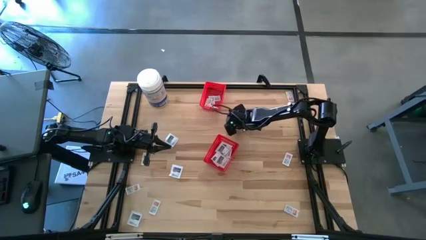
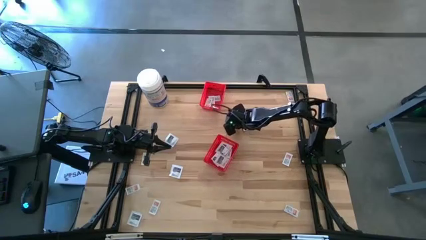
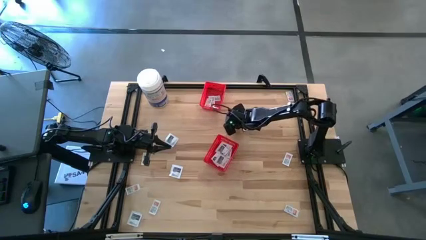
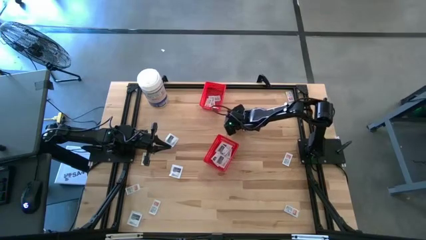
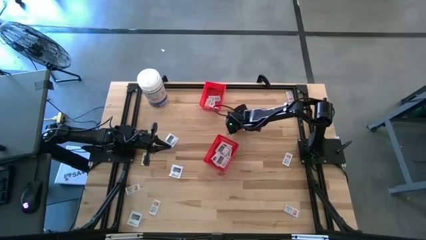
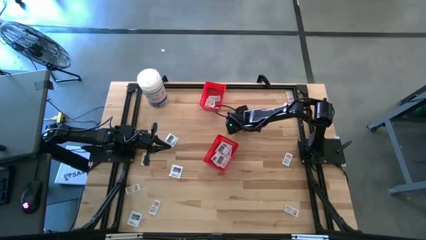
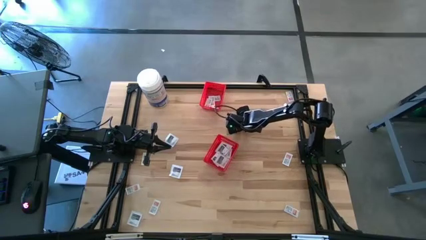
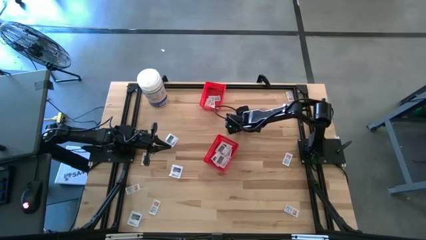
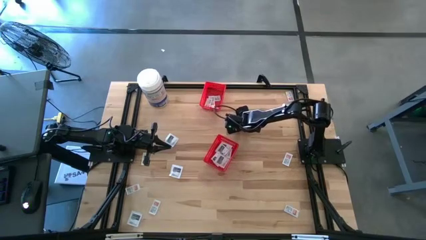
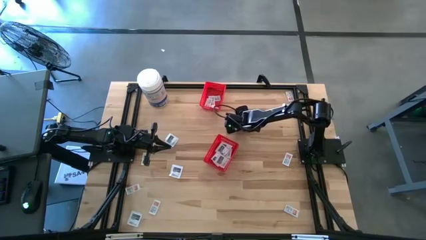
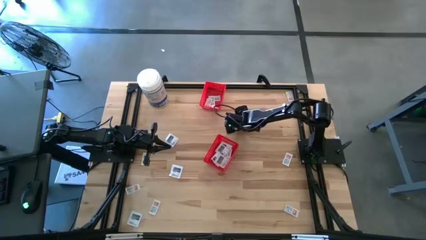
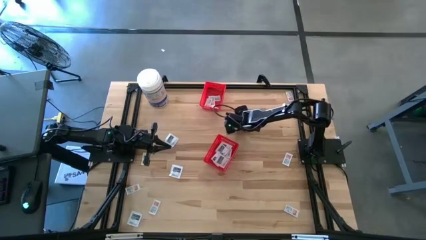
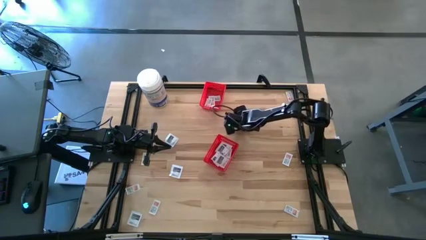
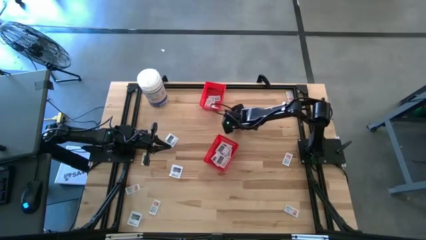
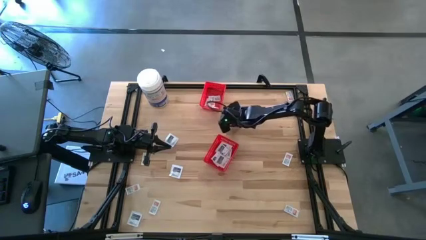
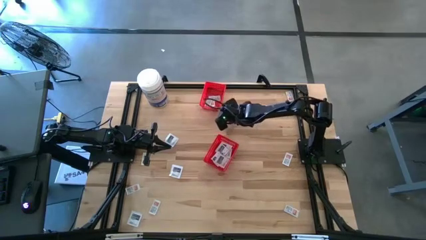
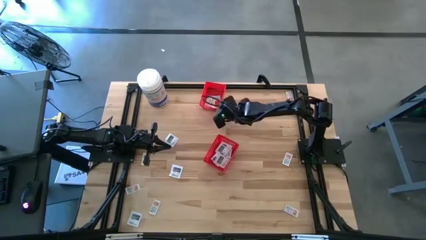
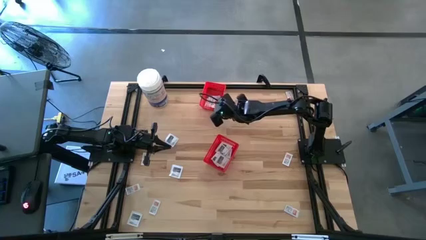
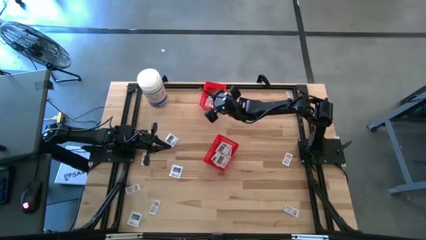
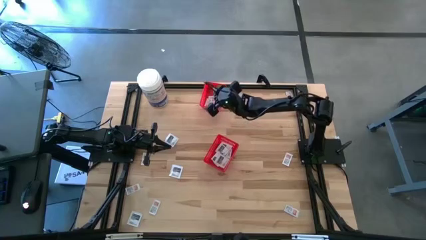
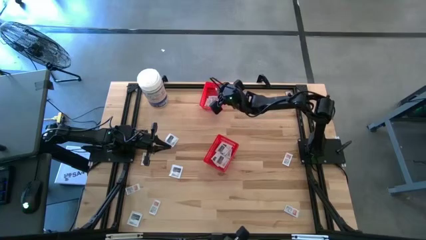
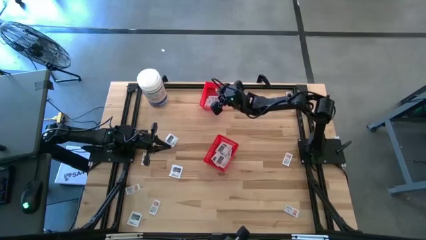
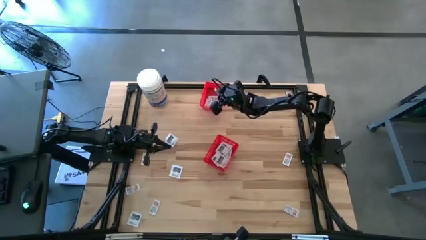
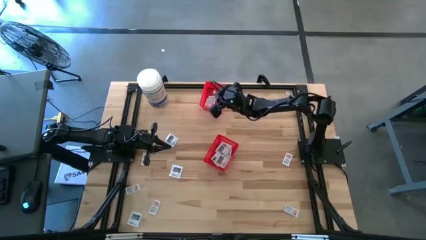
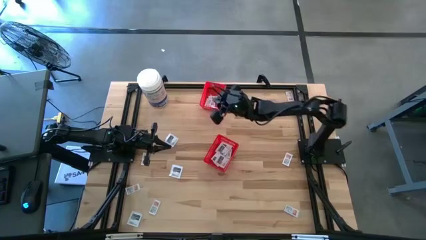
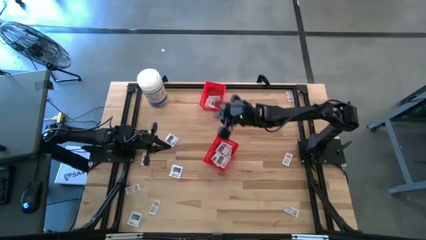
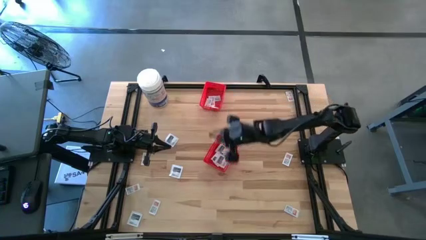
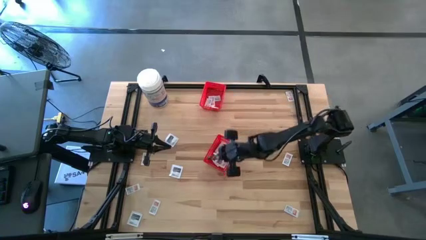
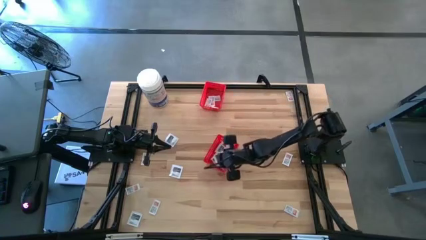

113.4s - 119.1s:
Task: Pick & Place First Aid Supplies
Put the white towelette pack into the bottom red bin

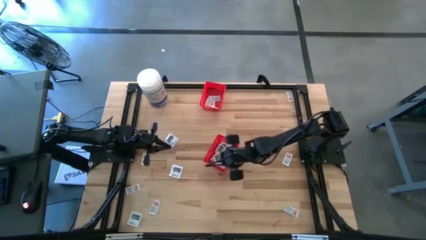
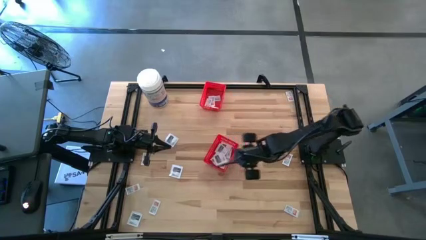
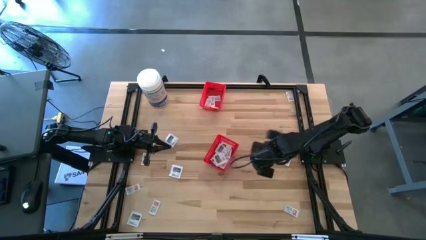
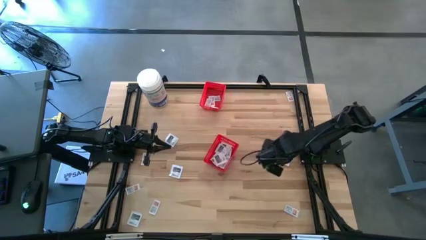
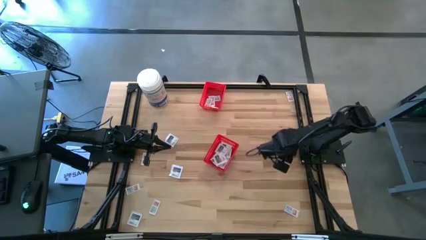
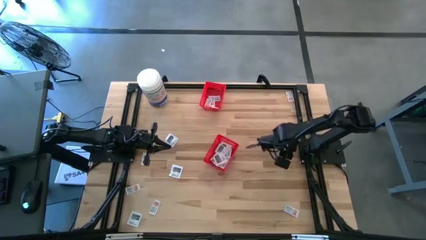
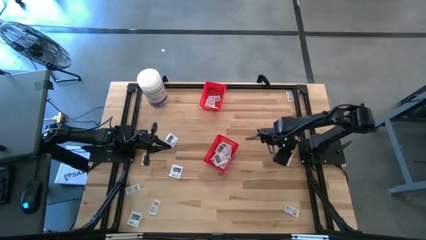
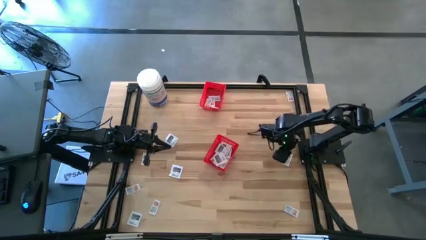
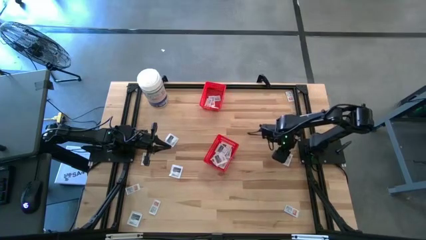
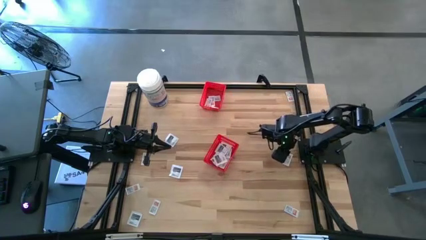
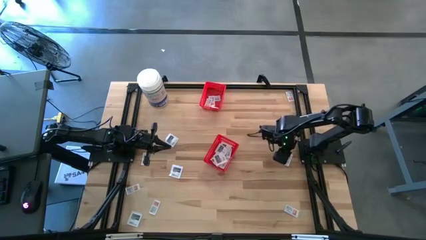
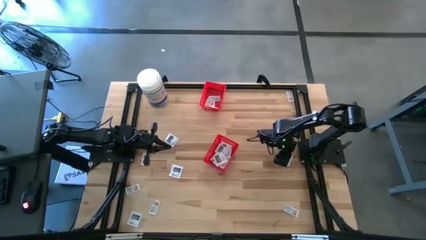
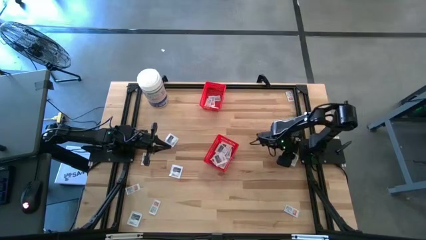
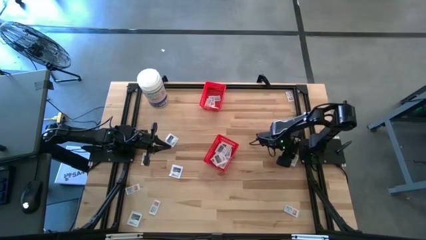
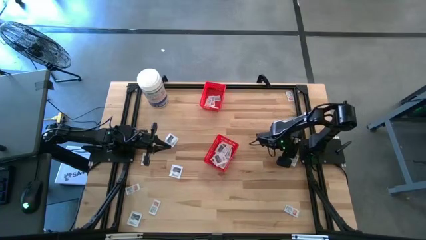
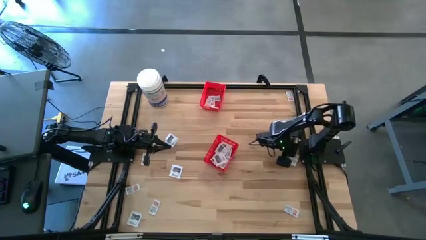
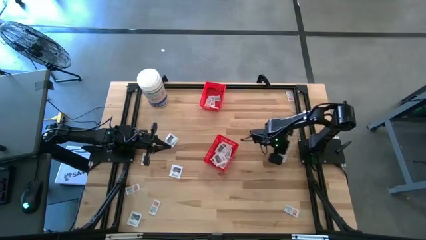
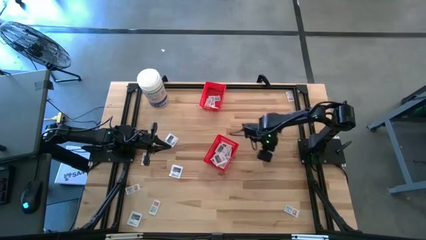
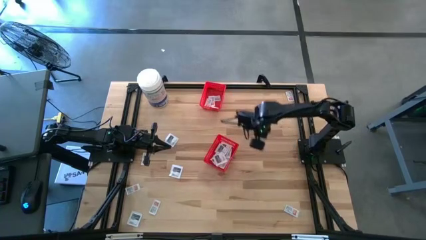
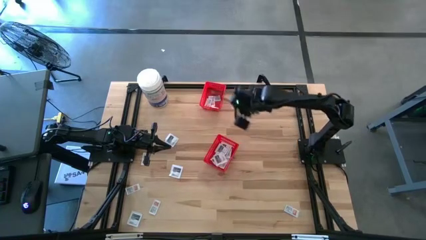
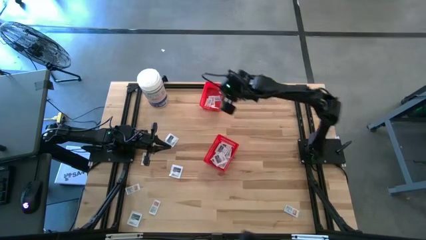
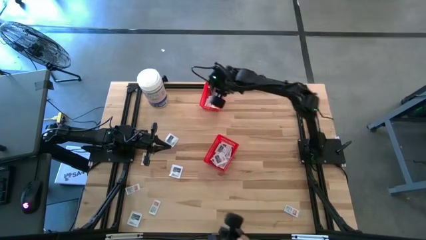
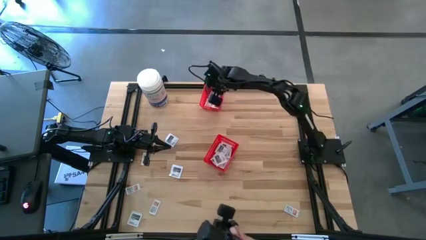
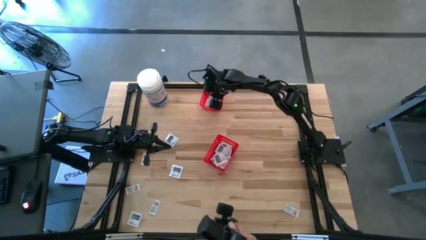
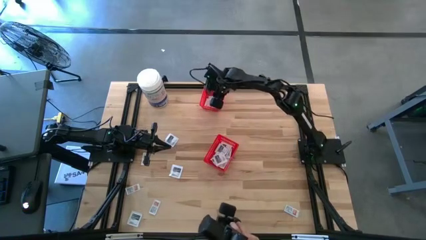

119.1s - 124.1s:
Put the white ointment pack into the top red bin

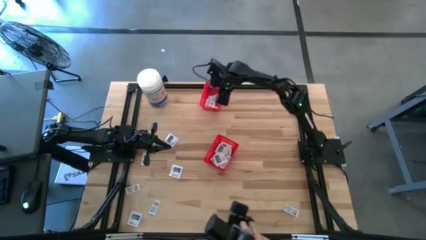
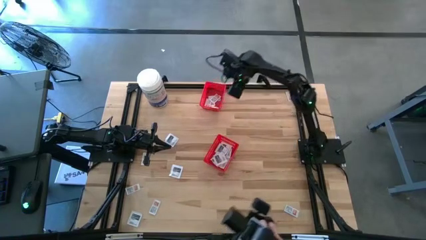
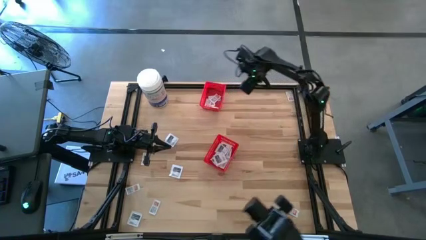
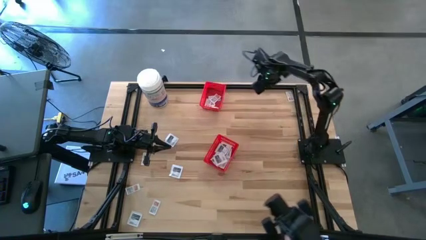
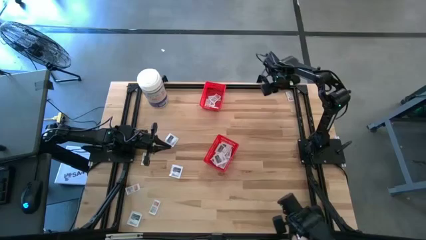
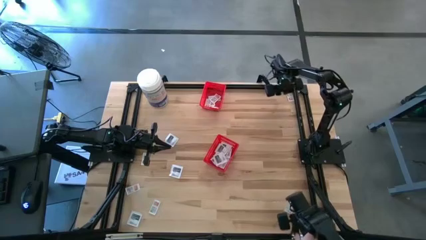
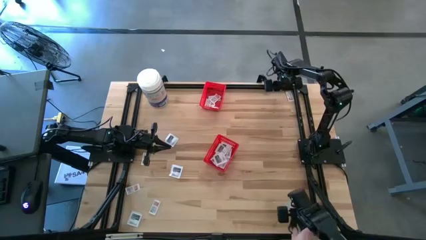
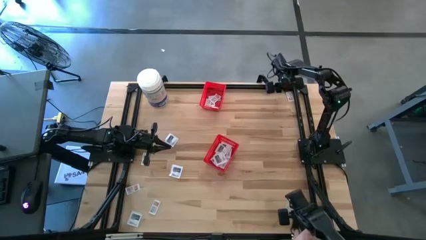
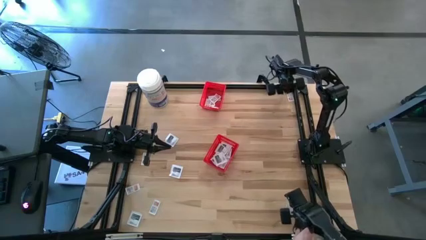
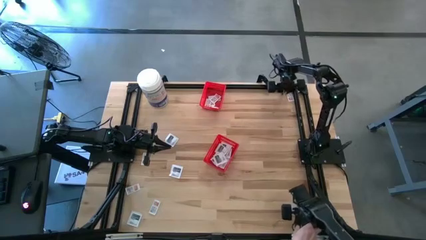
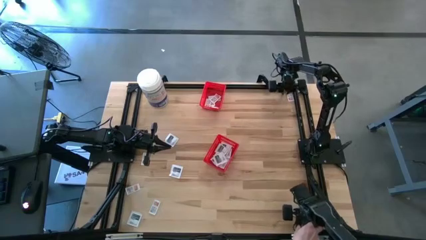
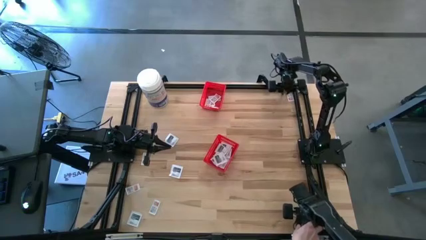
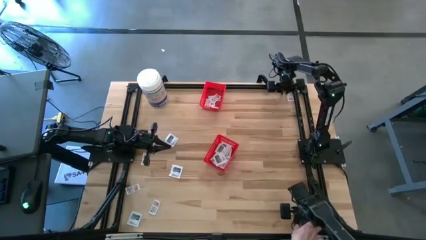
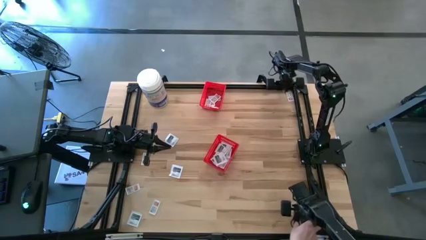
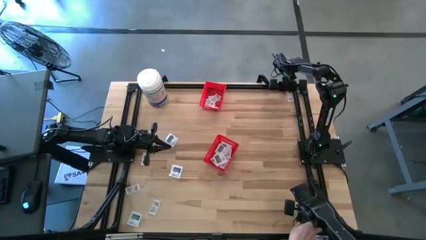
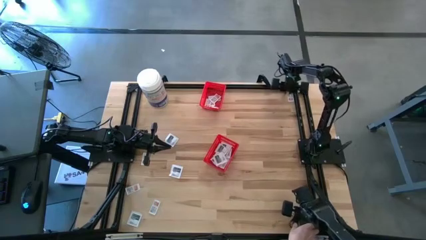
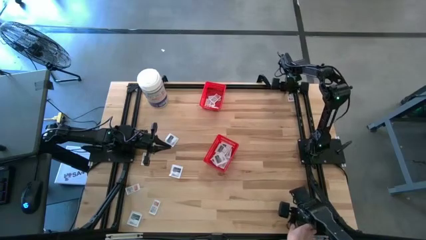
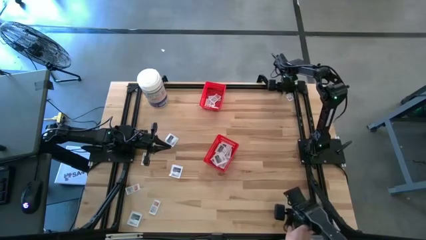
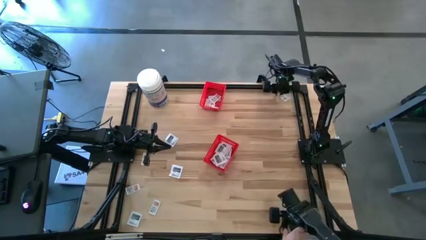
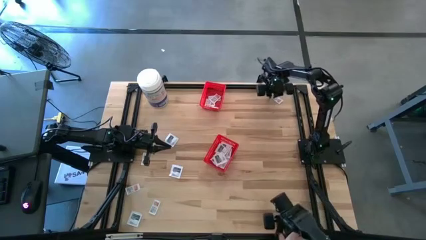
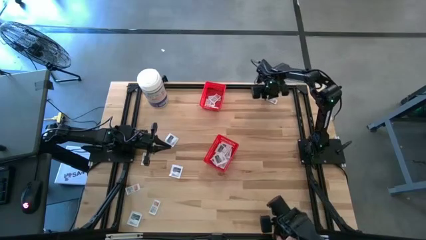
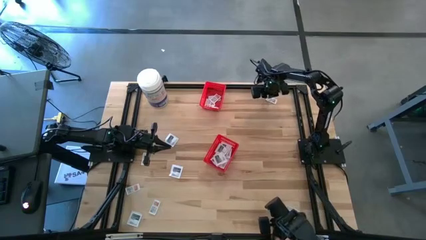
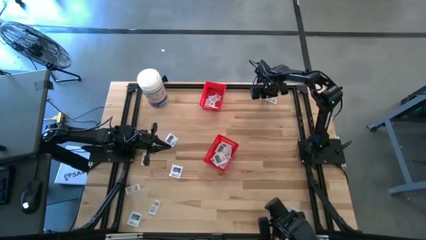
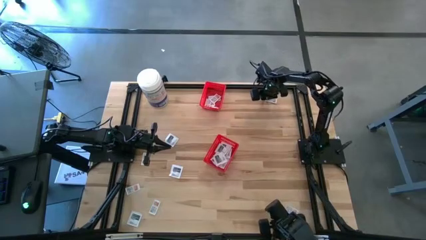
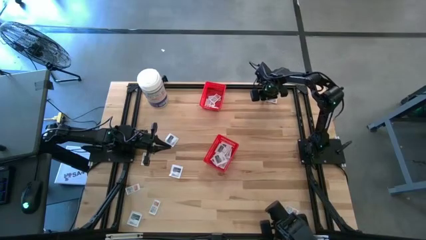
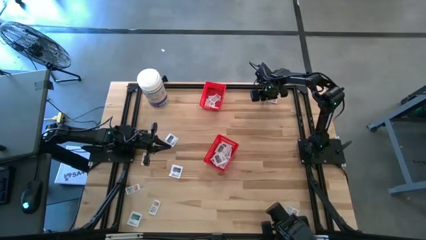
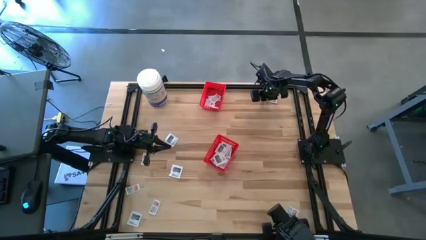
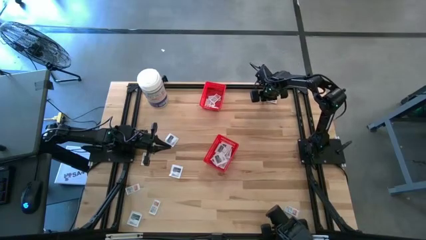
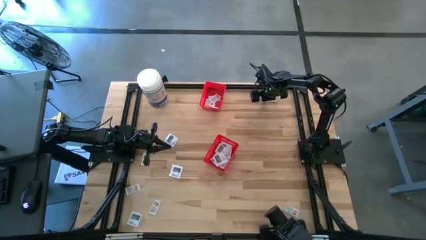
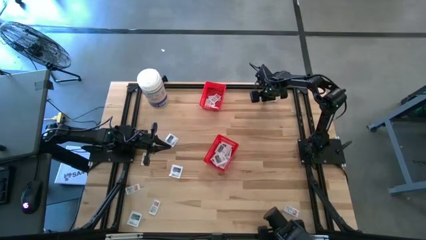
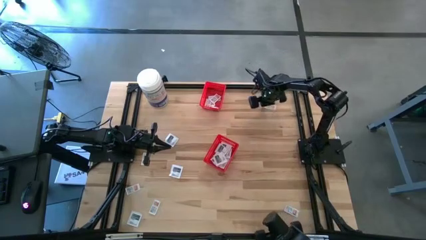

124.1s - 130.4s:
Put the white ointment pack into the top red bin
